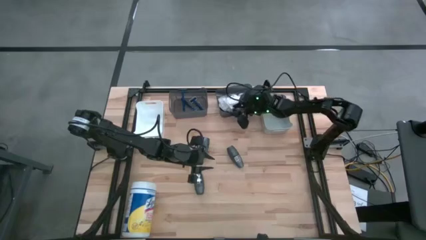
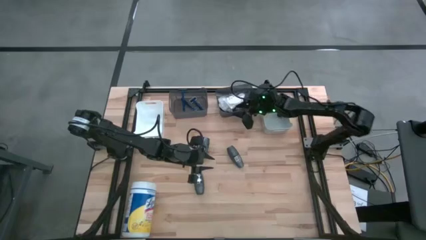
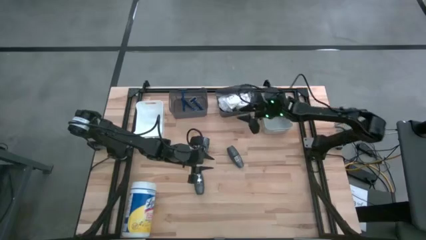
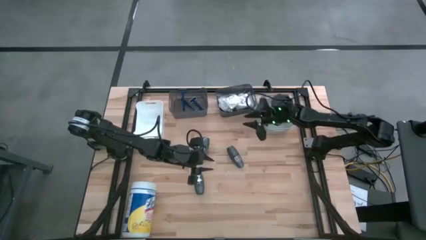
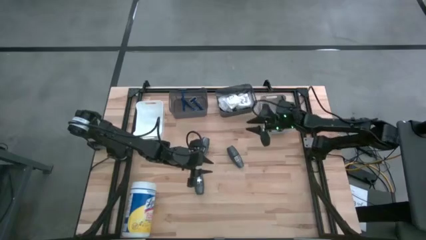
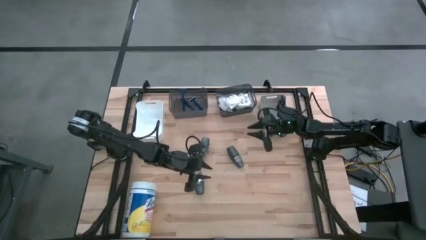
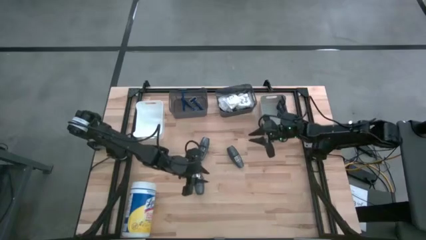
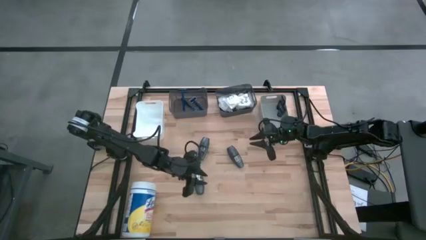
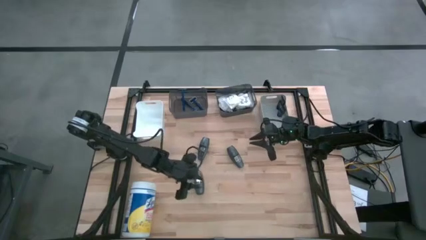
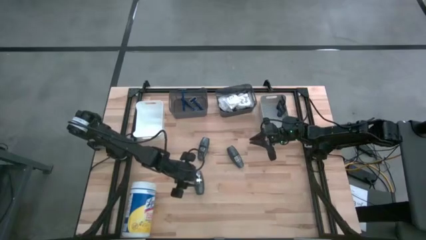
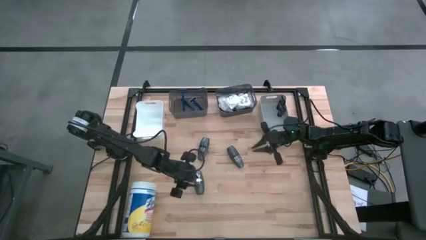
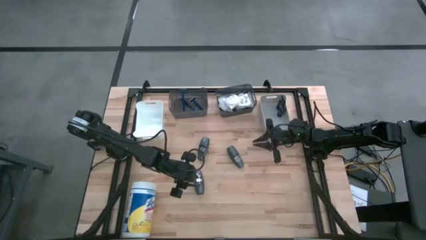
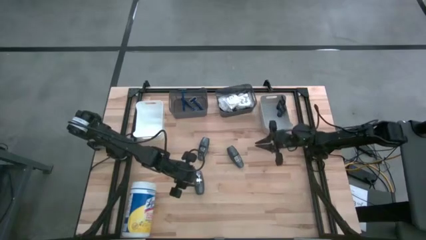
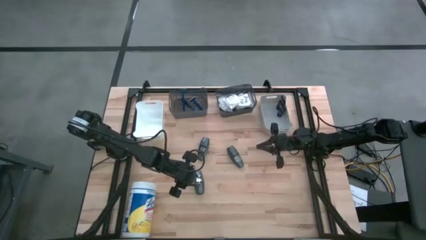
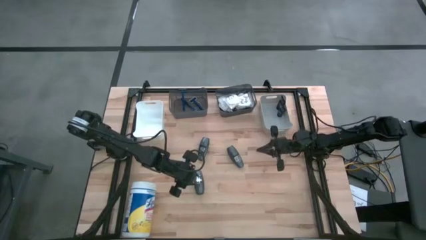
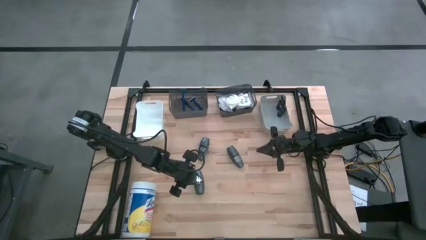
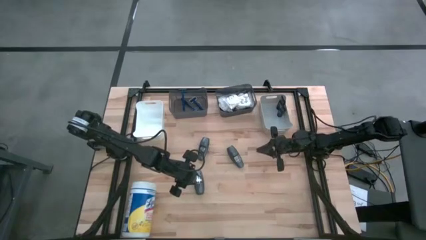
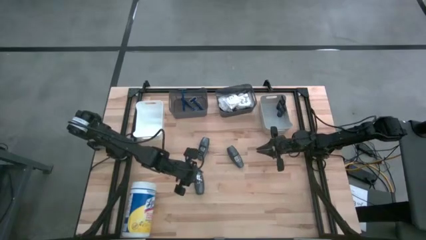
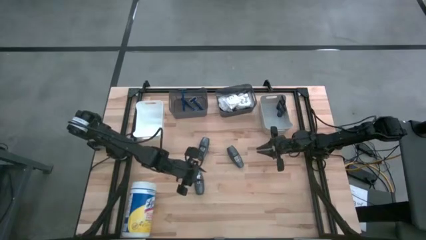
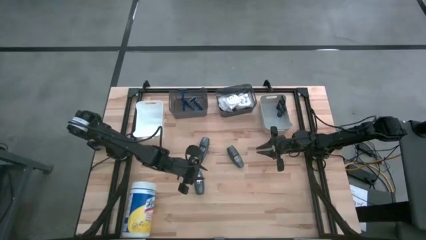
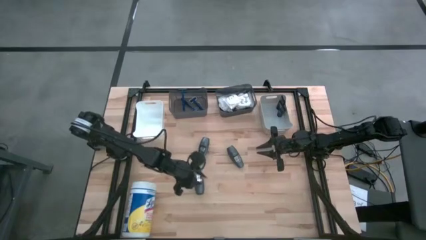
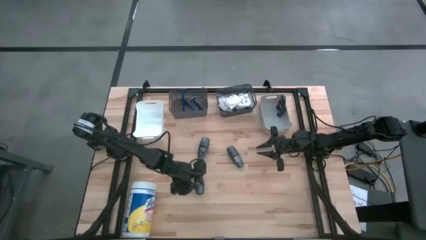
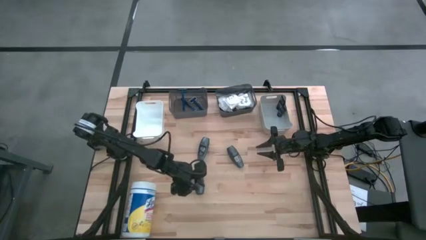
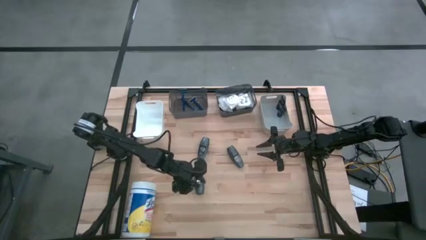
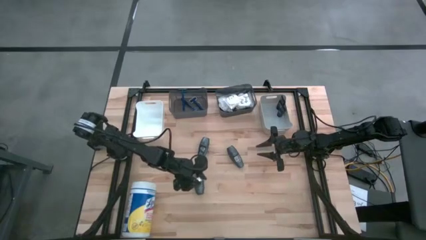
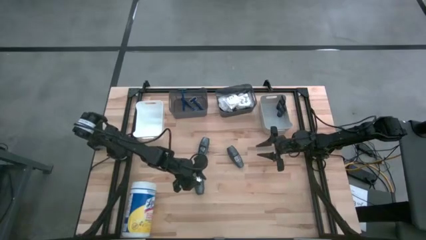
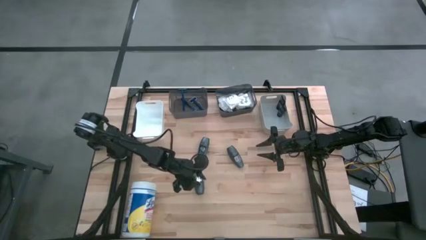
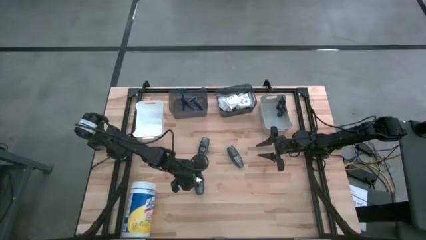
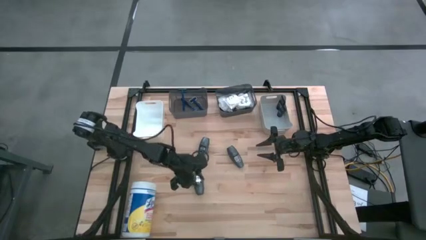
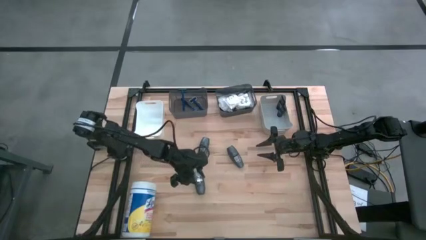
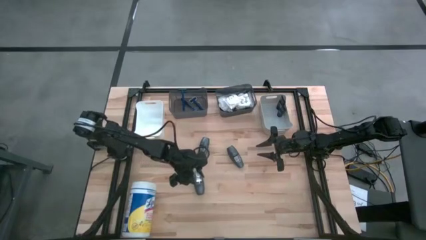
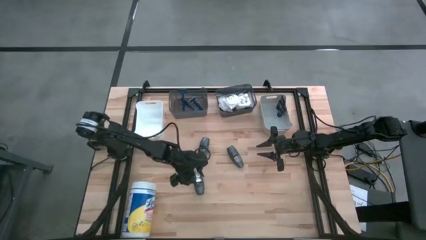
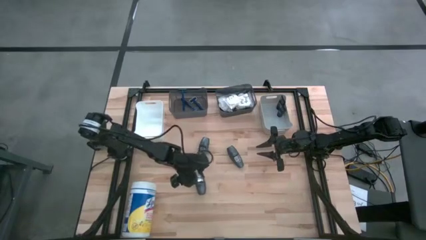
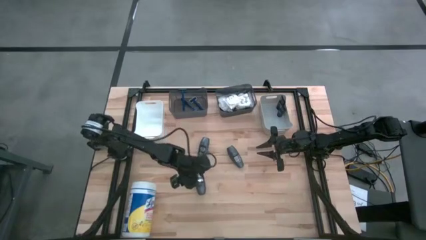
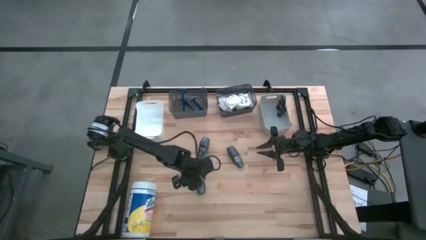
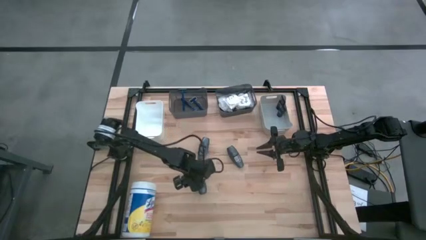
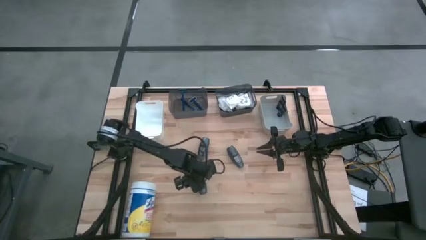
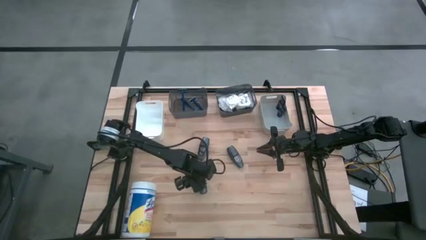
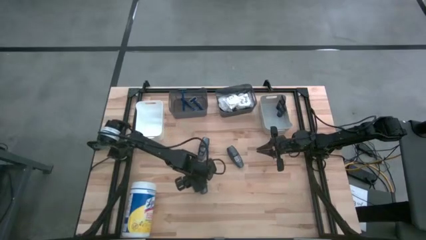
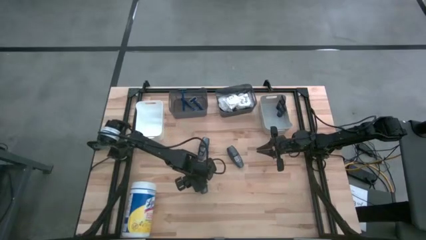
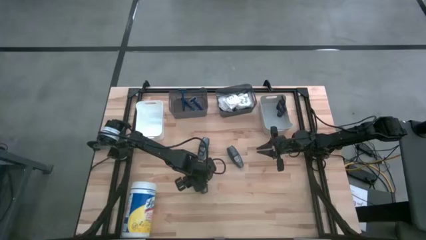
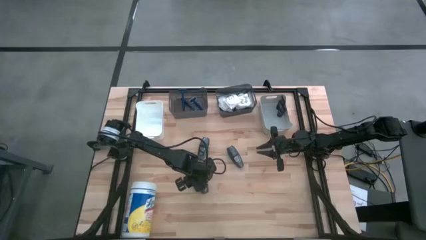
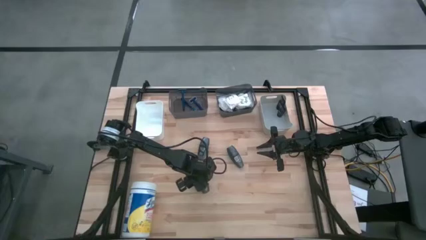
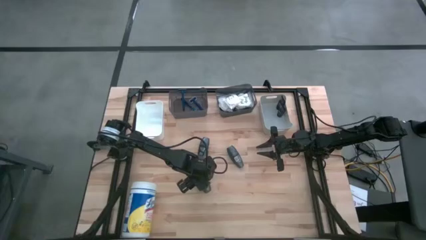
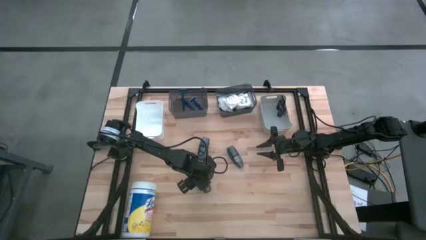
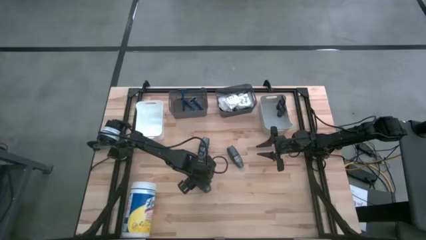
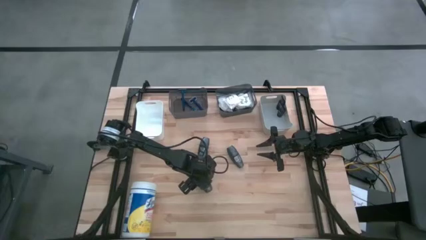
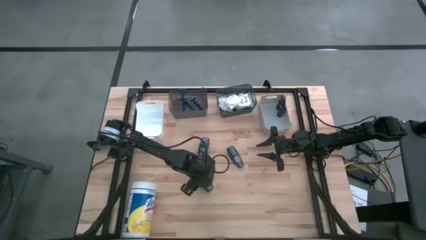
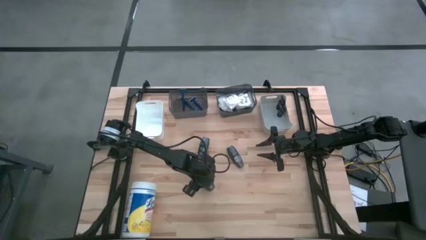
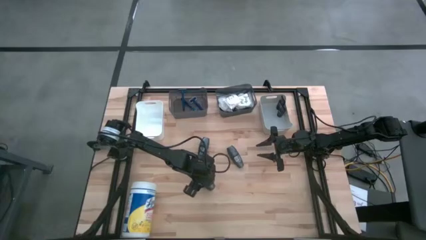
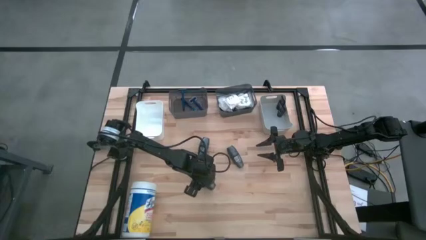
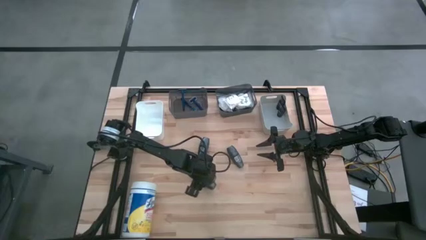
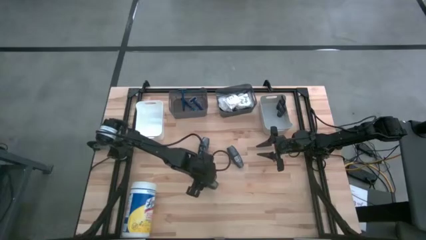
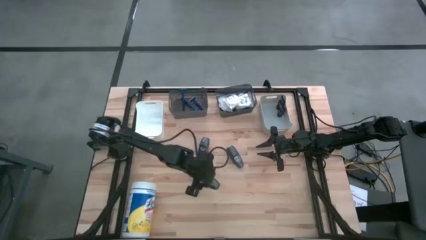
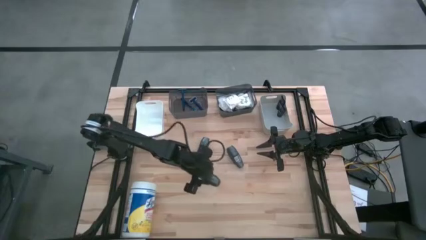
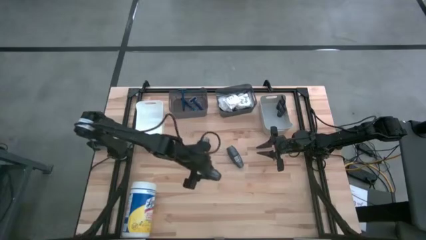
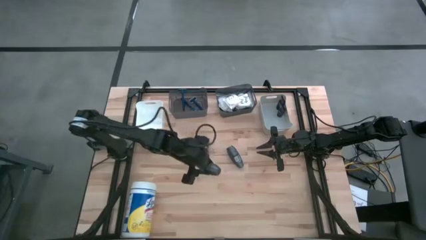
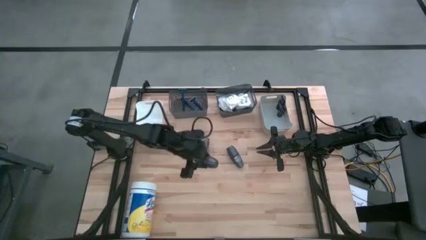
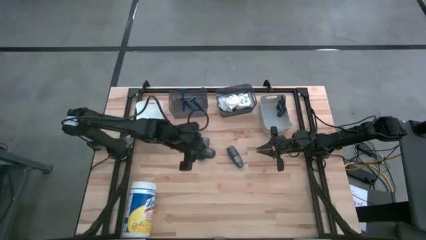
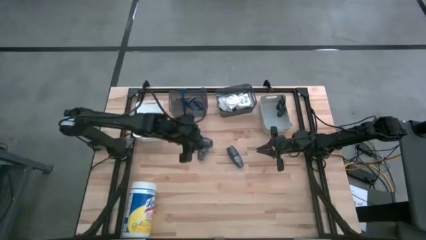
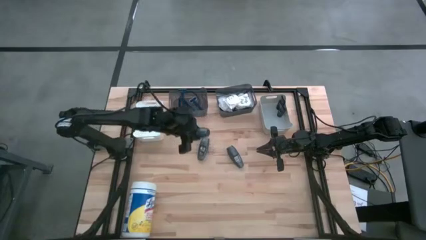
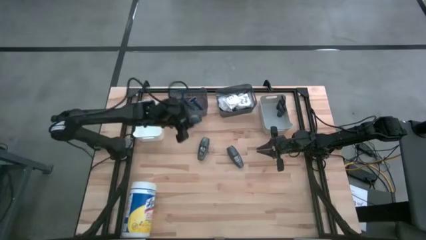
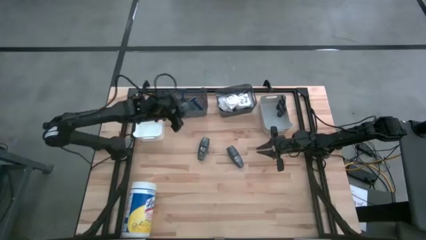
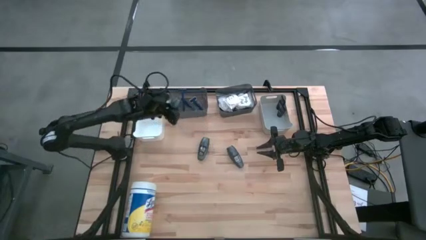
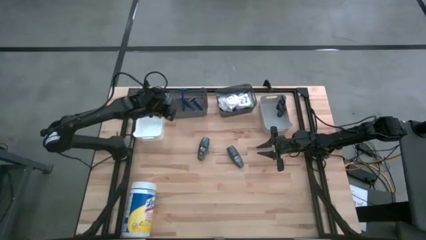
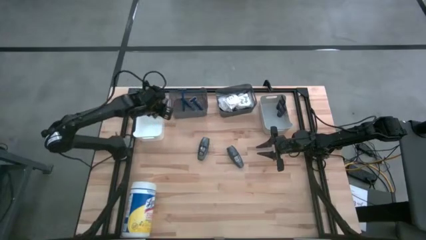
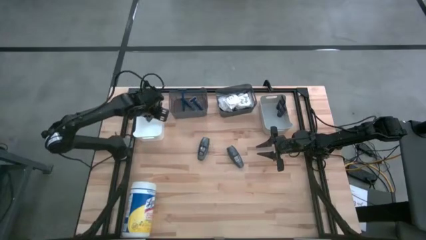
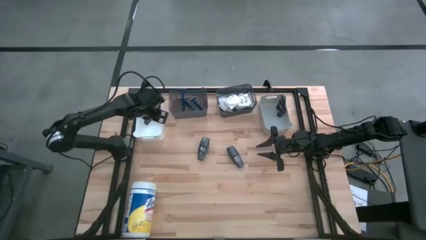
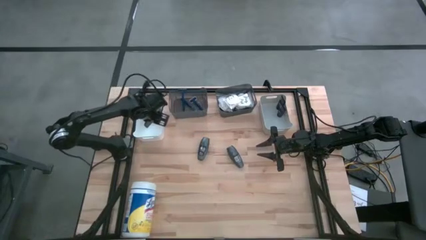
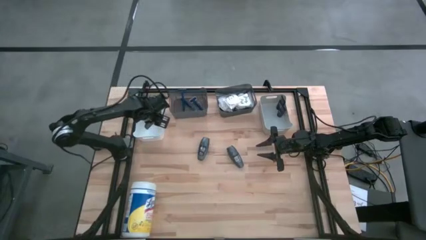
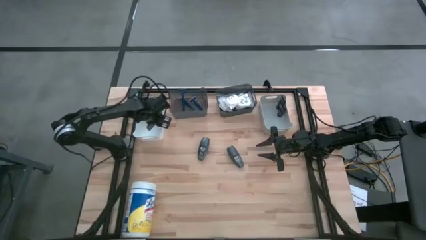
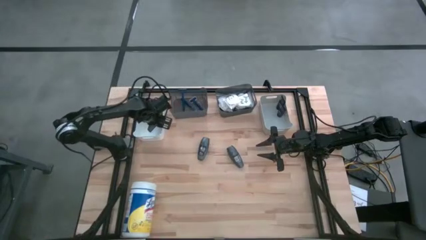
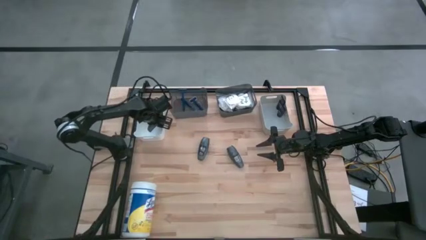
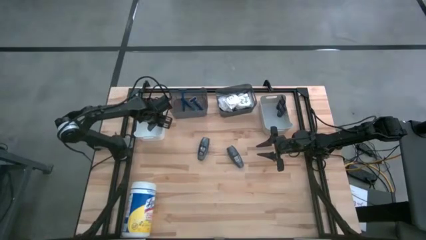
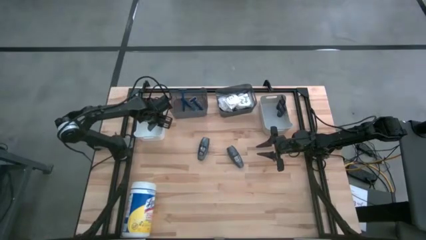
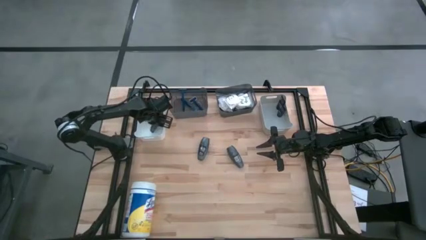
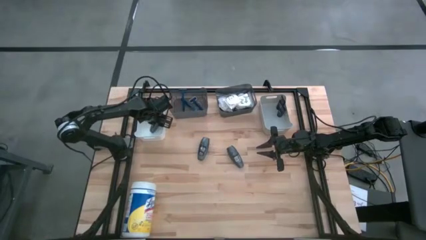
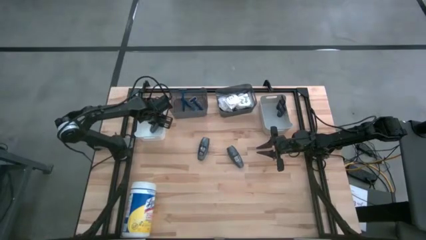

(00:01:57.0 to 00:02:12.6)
Task: Pick & Place Travel size toiletries
Put the black deodorant into the white bin
